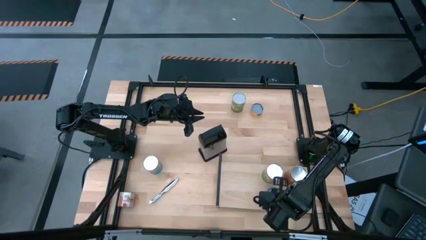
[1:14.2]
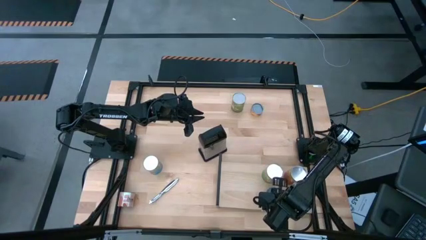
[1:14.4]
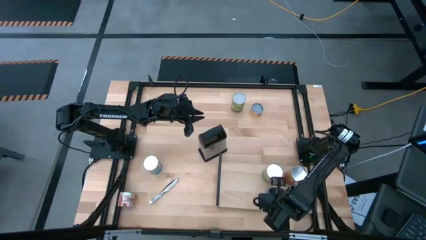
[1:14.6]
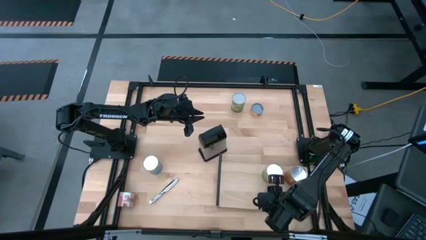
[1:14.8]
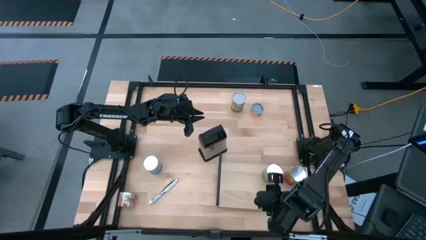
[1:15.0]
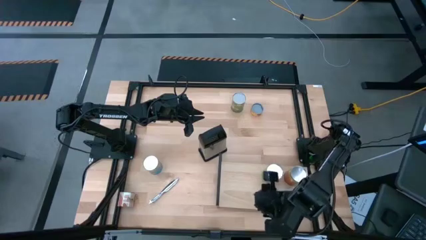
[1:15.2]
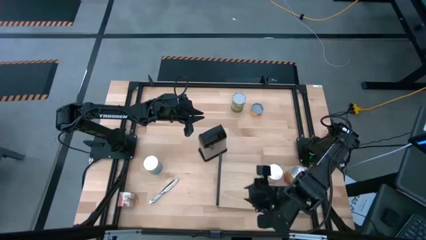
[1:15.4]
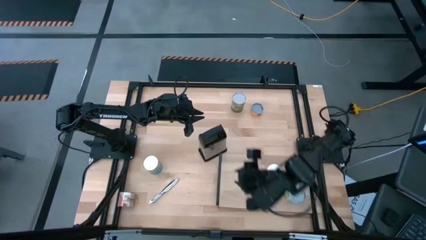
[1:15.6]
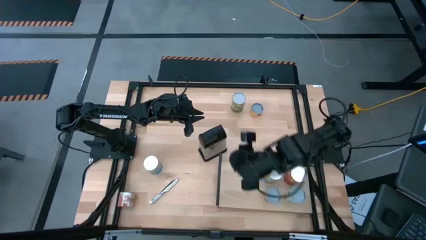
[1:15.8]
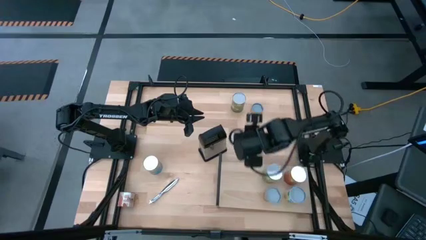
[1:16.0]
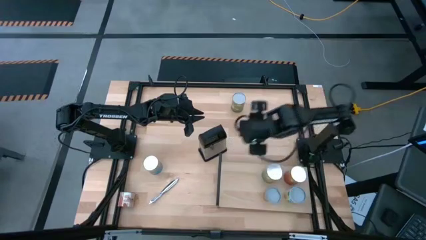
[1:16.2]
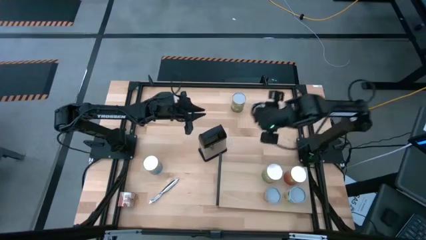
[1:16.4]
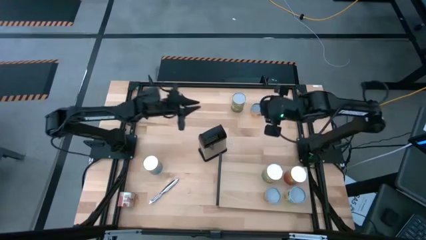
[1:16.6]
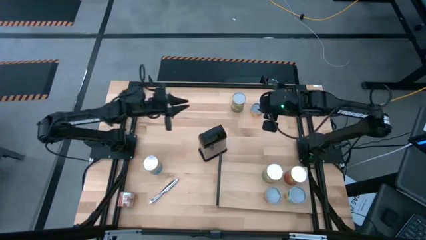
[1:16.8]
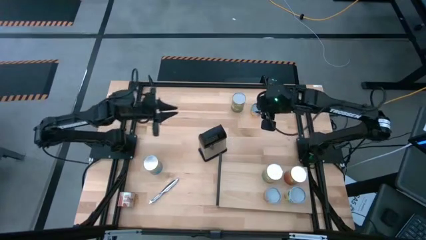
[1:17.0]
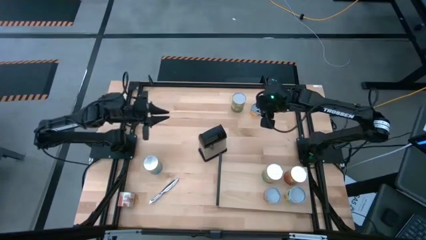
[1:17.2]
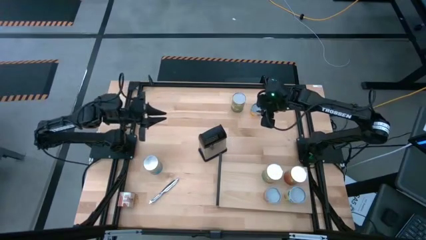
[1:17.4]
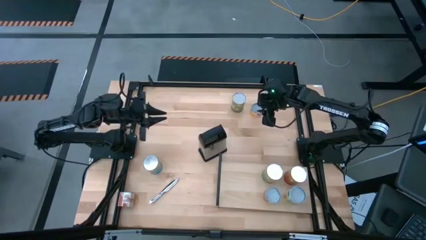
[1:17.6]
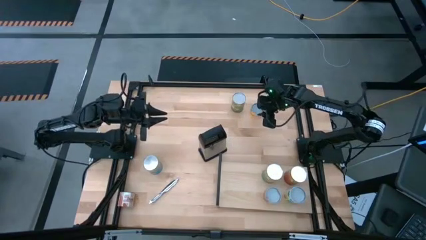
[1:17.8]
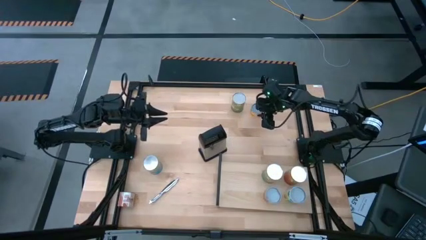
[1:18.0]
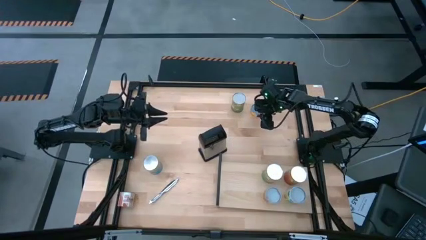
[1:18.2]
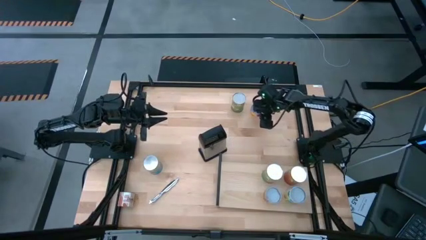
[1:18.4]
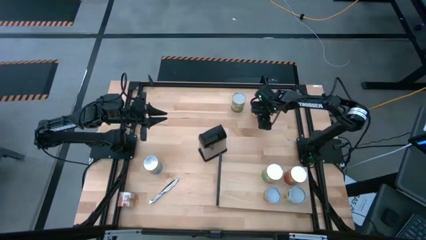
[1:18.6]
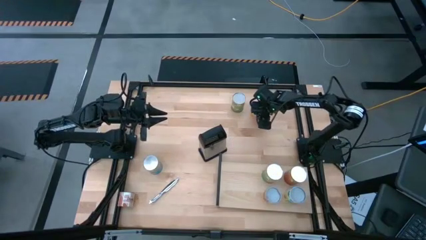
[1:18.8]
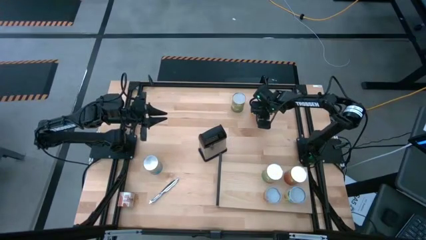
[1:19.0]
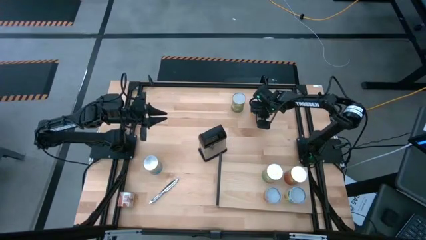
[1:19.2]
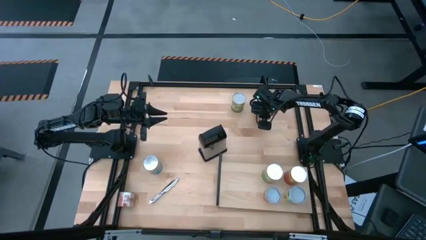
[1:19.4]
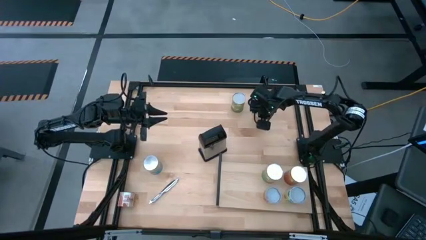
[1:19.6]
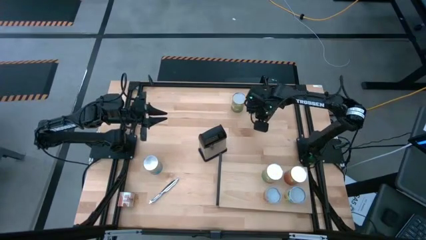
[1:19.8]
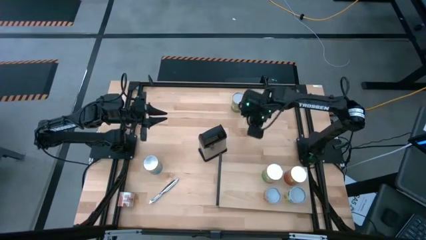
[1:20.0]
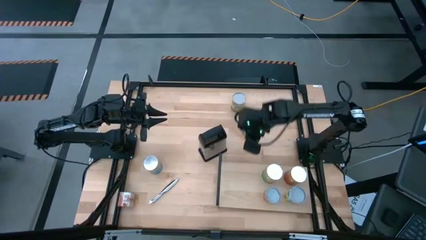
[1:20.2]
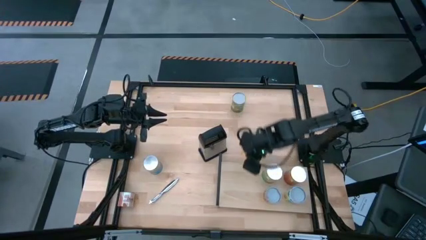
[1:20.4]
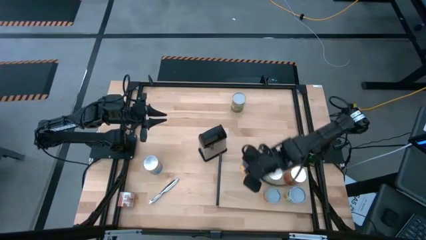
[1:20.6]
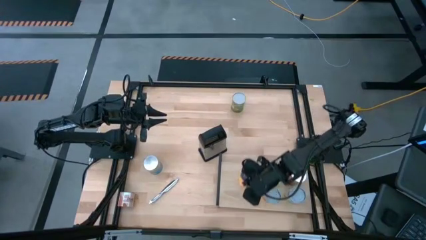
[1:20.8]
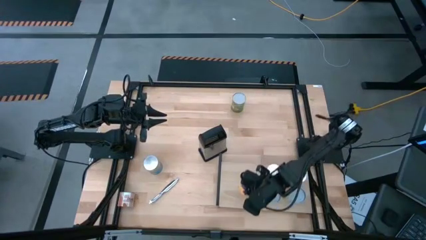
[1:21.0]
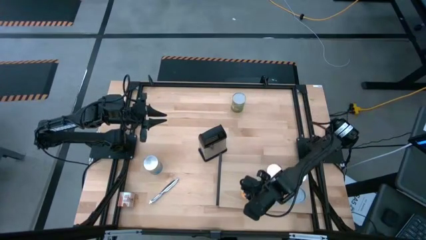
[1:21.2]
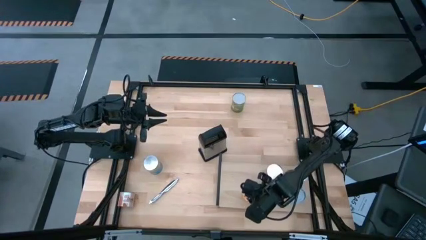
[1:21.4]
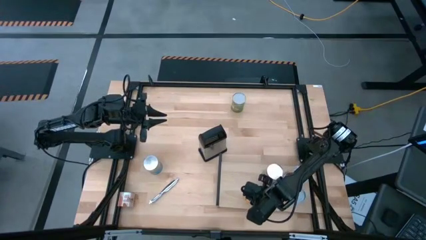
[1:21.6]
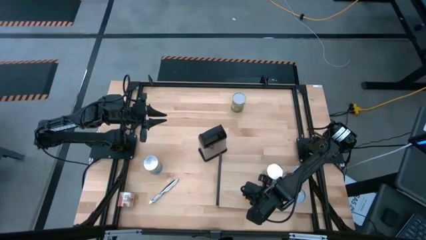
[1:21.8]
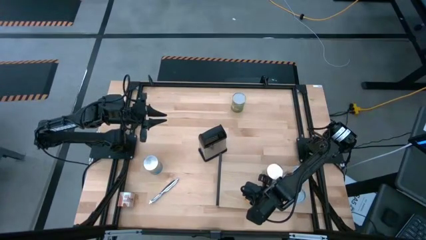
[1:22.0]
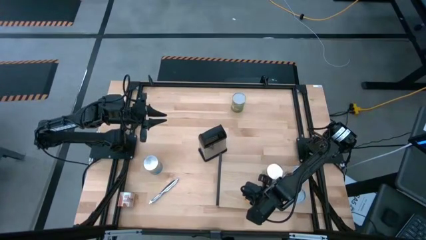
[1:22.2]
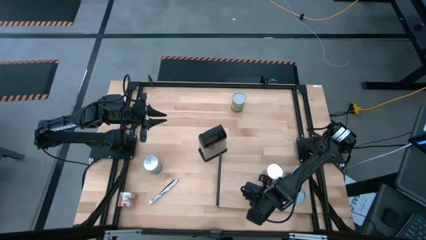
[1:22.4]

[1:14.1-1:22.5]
Task: Pick and place cans onto a shelf
Put the small canned pineapple on the shelf

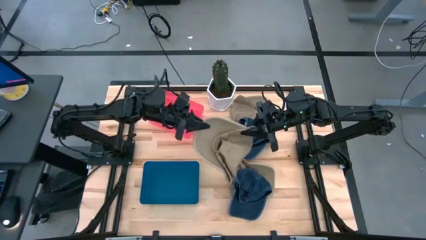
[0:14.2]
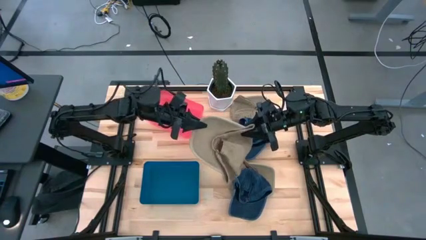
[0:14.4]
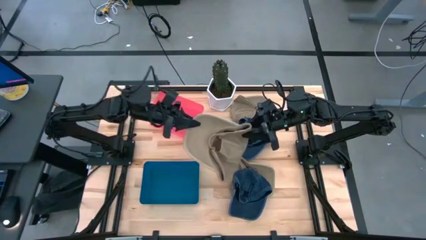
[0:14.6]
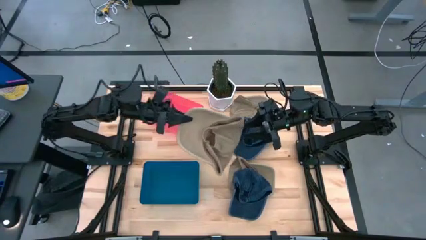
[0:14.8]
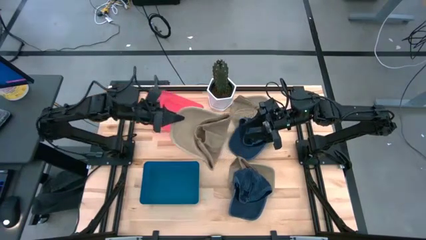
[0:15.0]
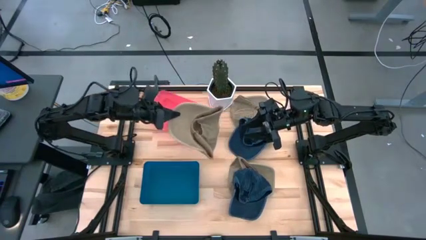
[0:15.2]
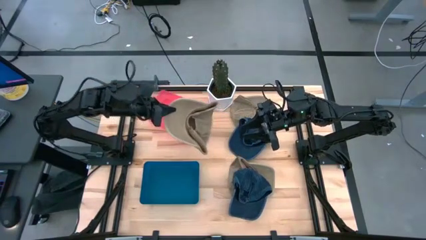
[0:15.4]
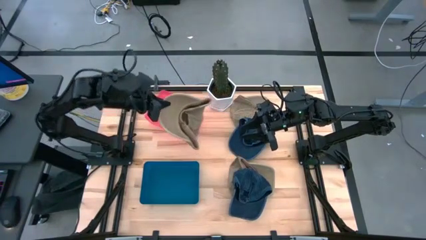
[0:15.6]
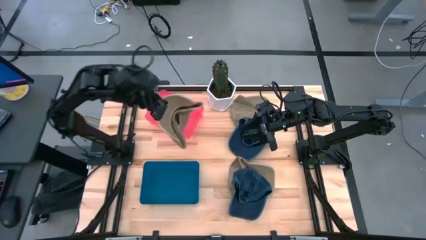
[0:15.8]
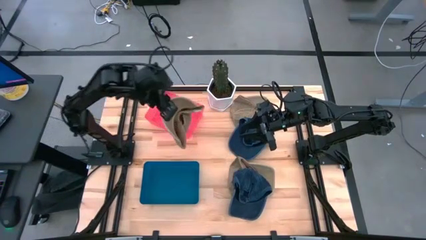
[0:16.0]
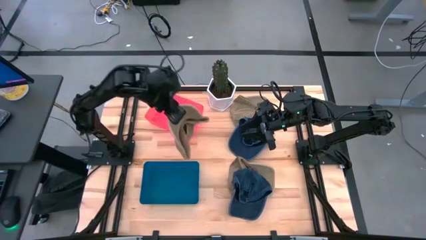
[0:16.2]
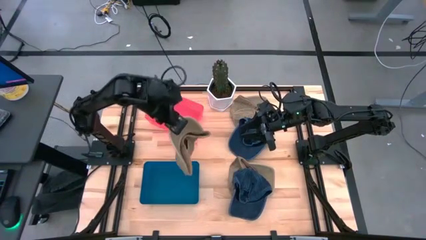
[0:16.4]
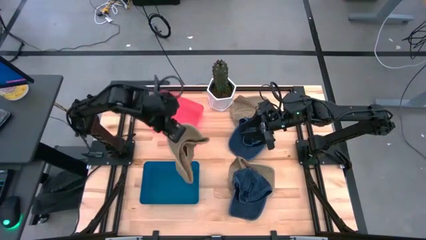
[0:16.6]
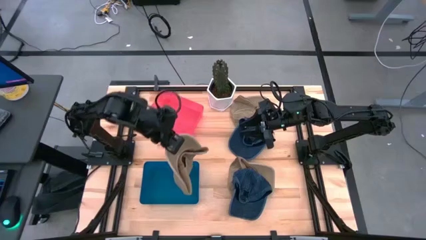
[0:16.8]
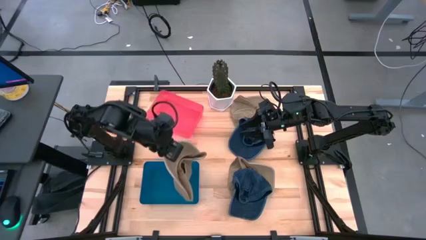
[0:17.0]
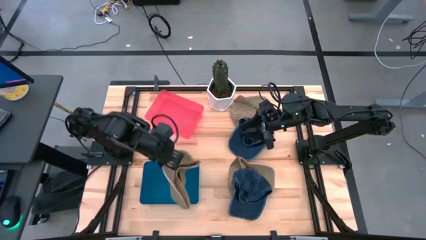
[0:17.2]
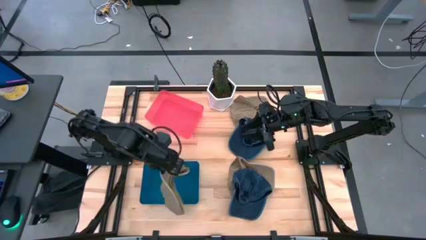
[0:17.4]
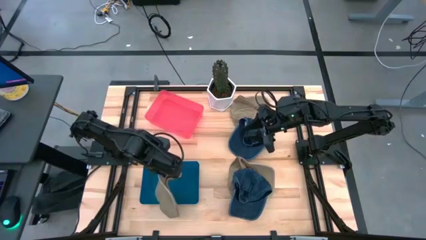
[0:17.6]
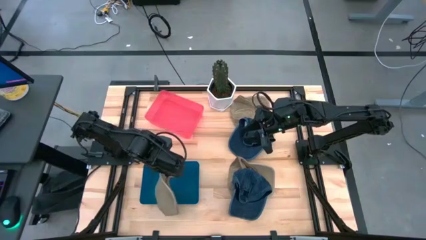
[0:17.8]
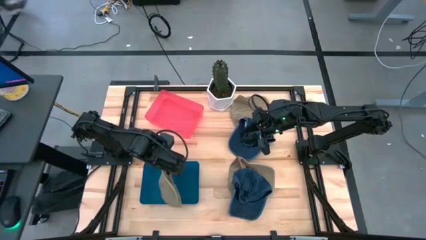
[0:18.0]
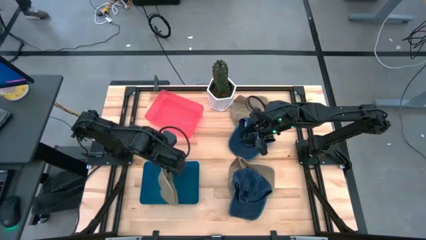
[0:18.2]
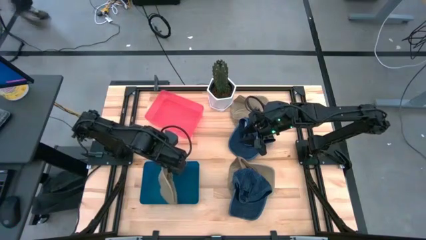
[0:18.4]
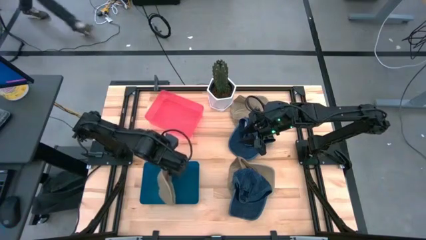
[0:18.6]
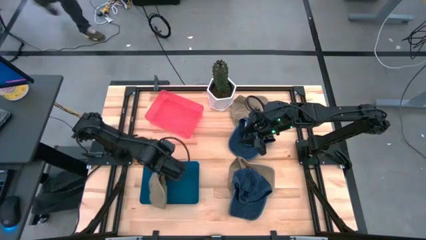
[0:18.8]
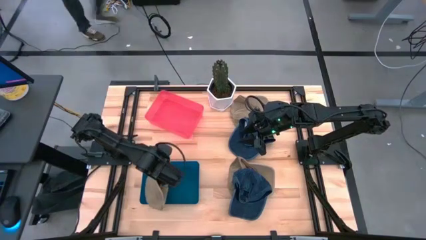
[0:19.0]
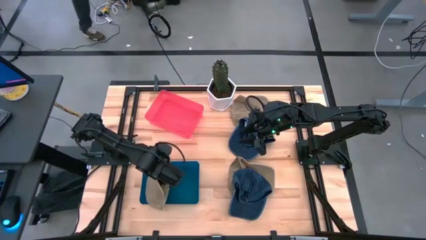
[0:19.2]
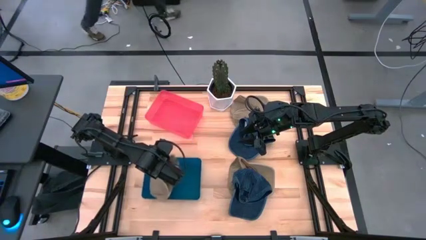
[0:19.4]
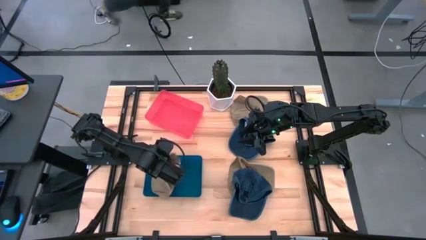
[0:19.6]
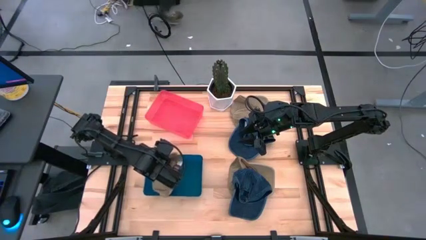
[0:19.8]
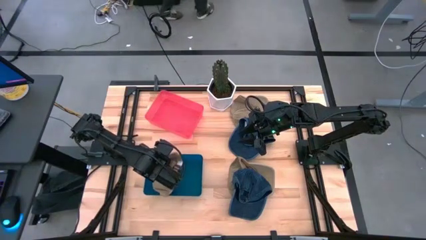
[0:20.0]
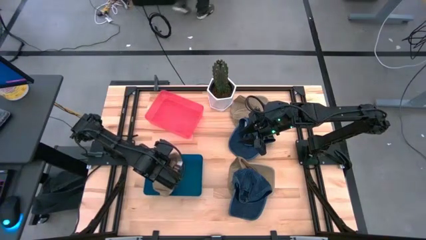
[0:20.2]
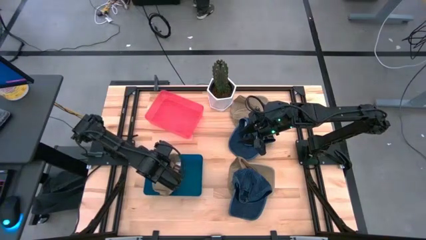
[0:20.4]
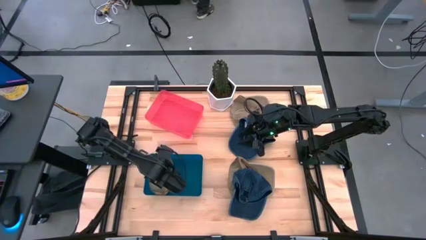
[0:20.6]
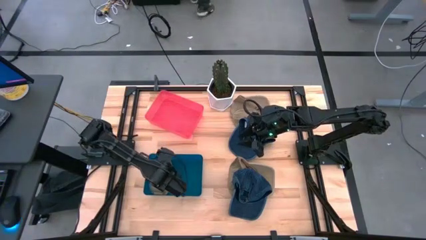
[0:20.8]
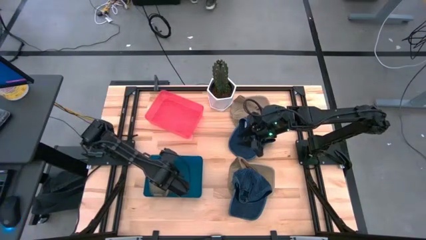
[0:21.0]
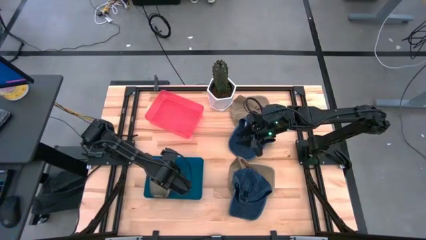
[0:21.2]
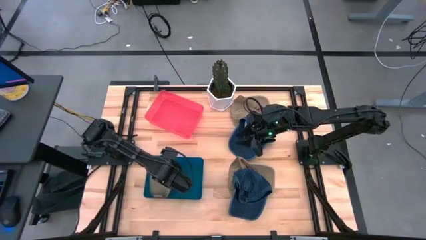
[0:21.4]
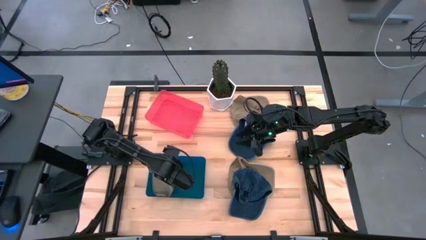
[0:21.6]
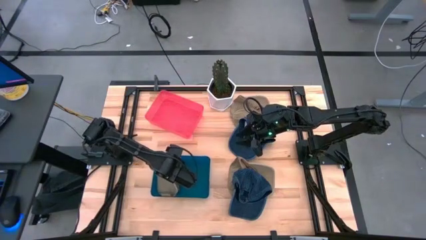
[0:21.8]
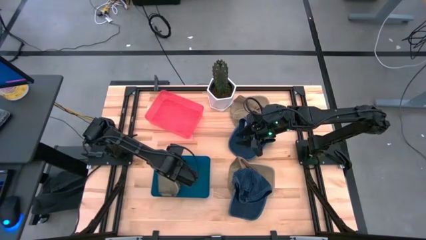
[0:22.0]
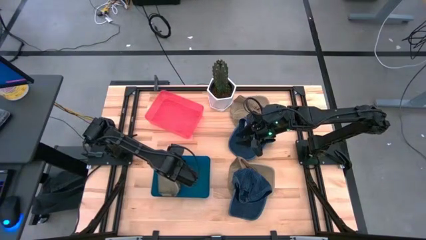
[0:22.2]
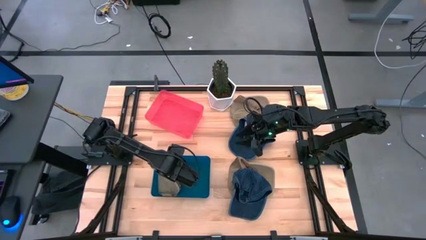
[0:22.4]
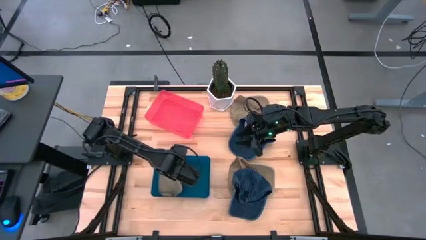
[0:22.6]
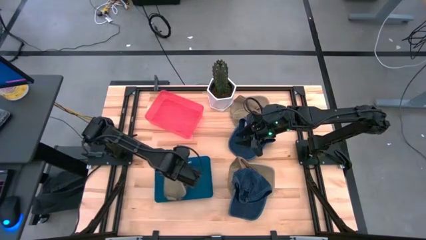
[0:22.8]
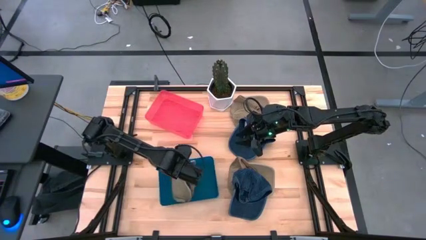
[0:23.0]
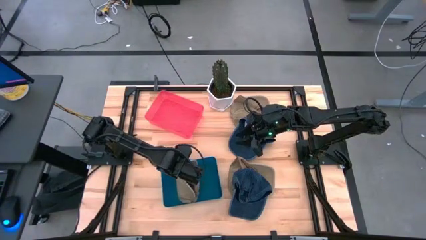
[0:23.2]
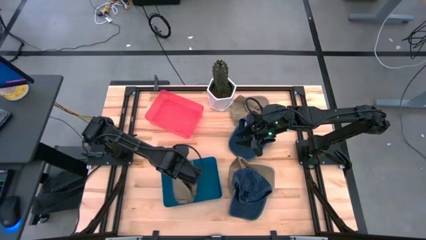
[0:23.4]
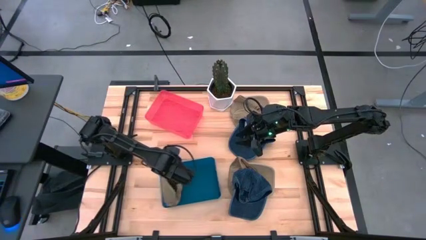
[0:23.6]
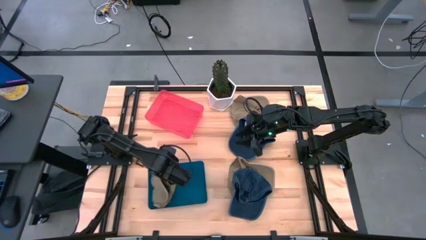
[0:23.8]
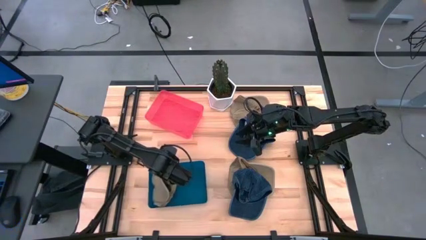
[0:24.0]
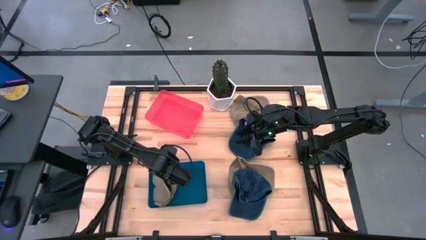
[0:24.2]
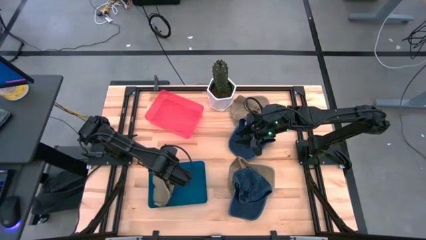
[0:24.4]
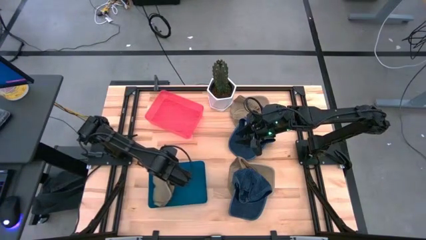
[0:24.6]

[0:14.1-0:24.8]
Task: Pick & Place hat
Put the middle brown cap into the blue bin
